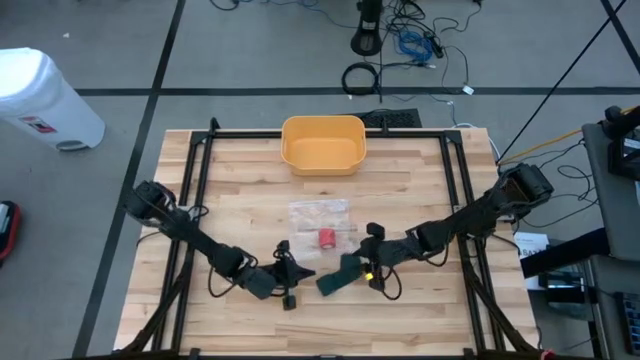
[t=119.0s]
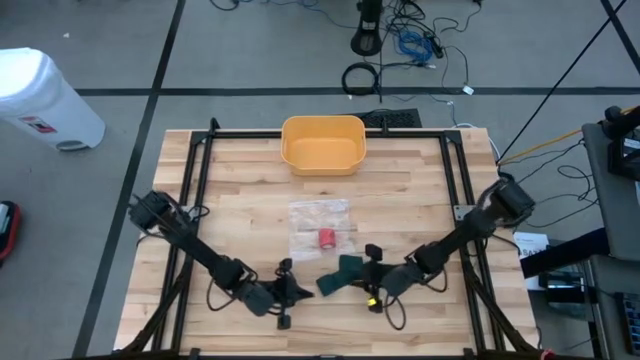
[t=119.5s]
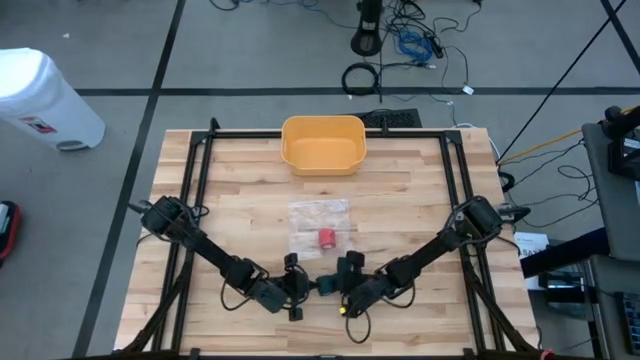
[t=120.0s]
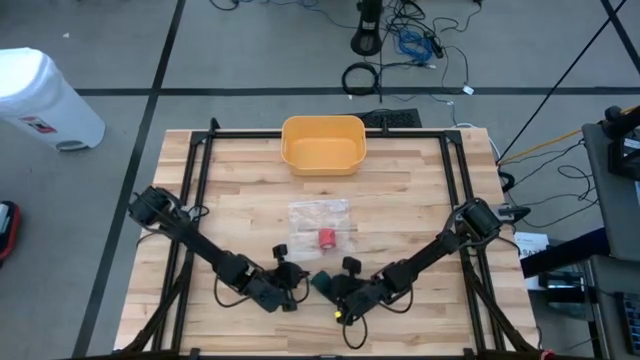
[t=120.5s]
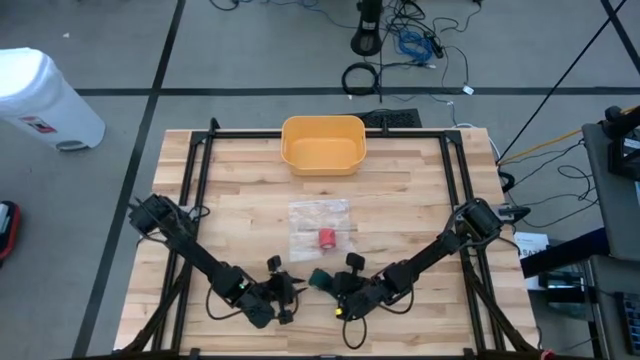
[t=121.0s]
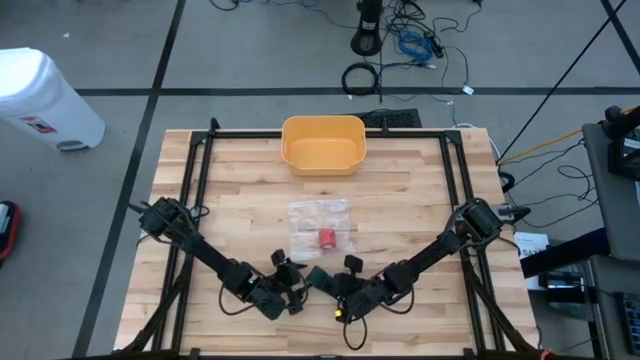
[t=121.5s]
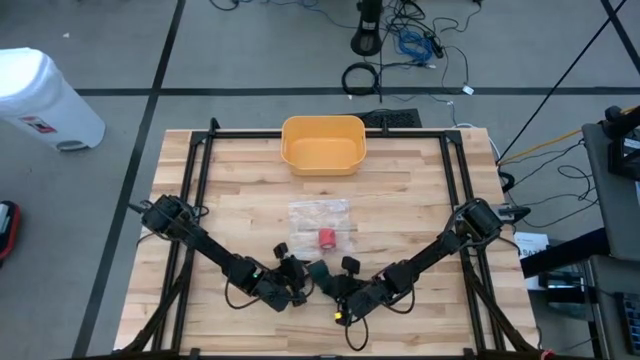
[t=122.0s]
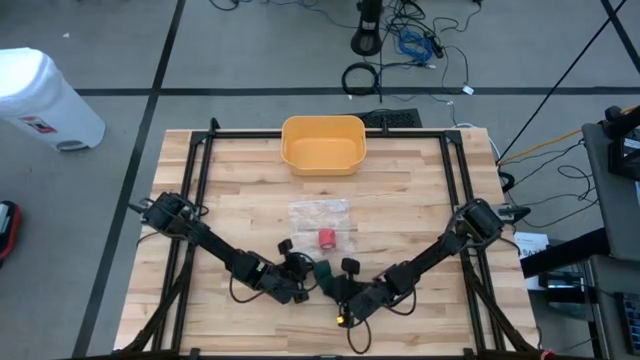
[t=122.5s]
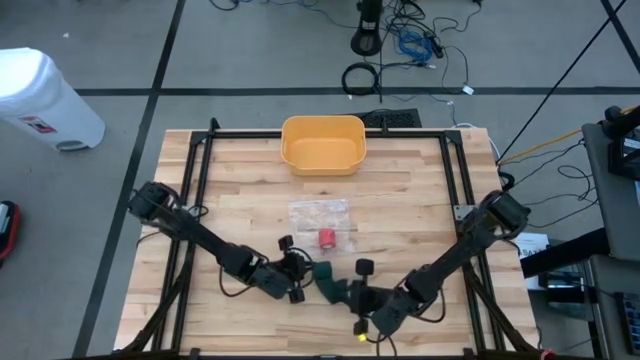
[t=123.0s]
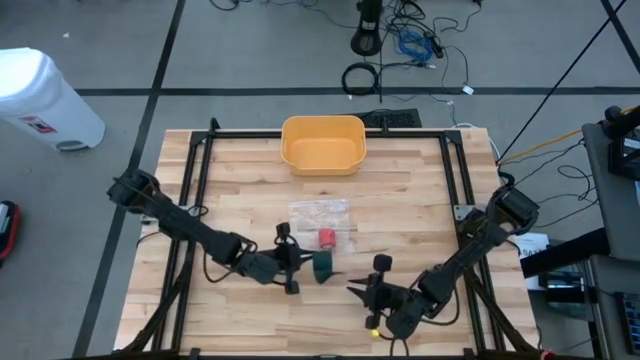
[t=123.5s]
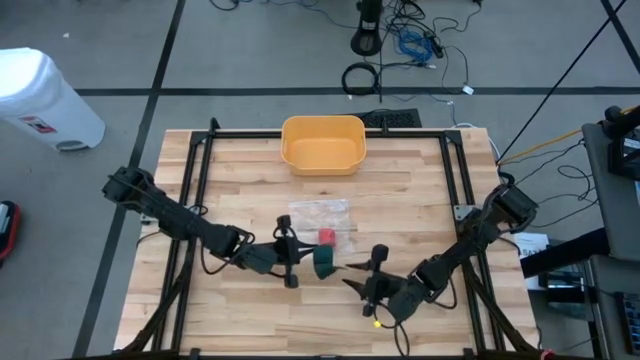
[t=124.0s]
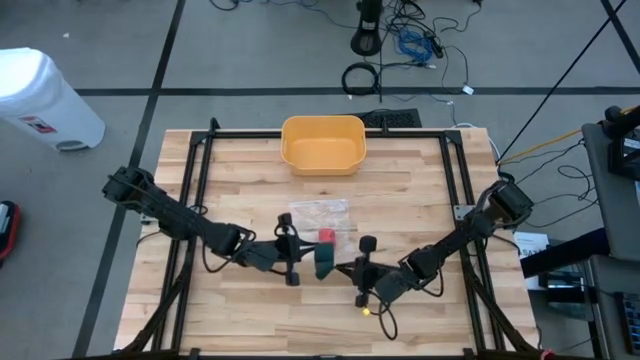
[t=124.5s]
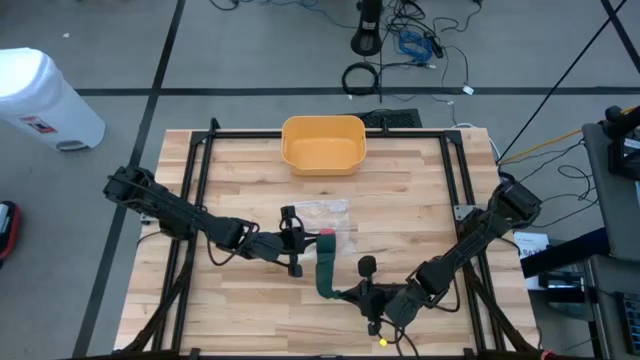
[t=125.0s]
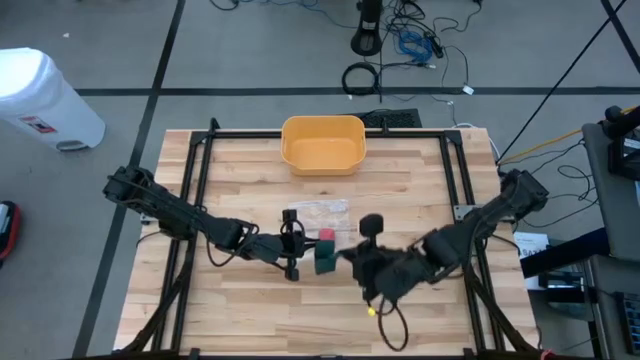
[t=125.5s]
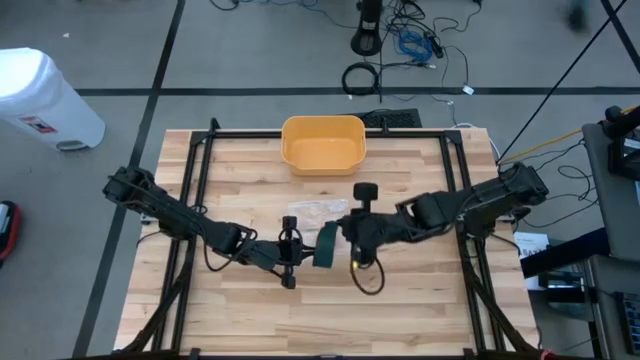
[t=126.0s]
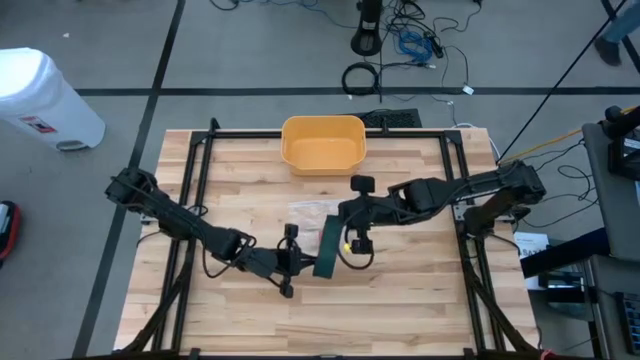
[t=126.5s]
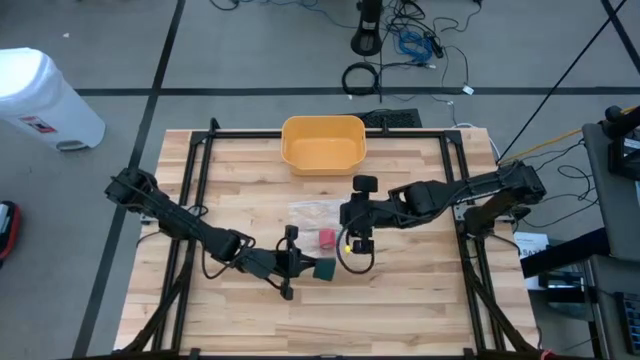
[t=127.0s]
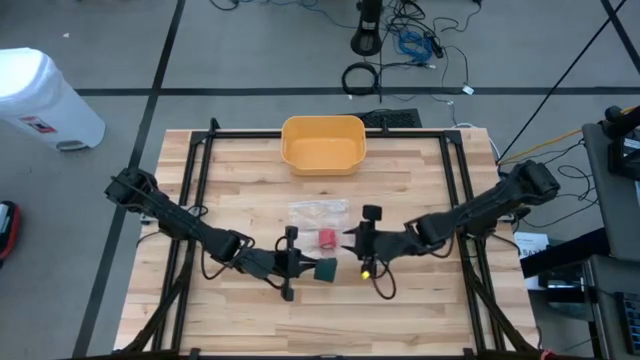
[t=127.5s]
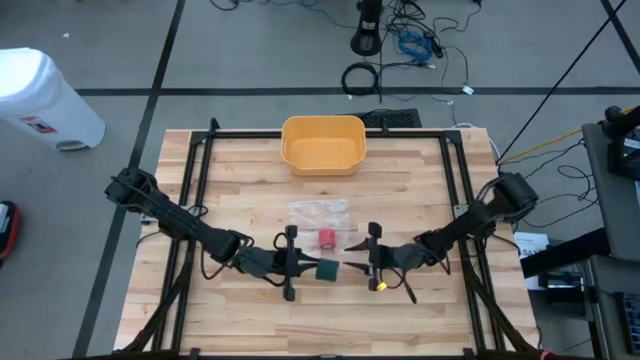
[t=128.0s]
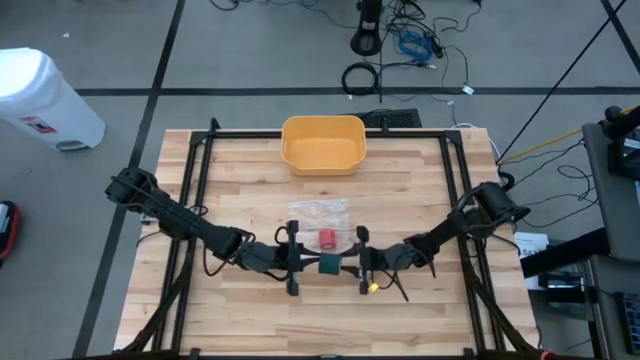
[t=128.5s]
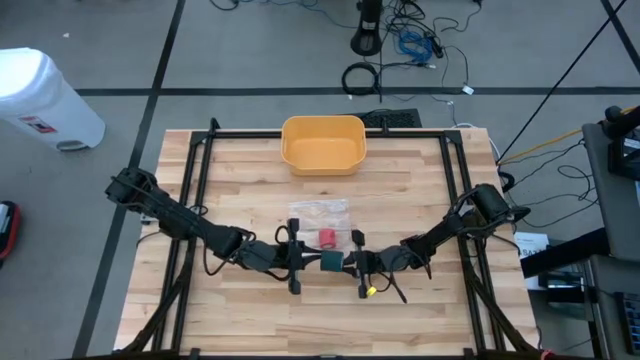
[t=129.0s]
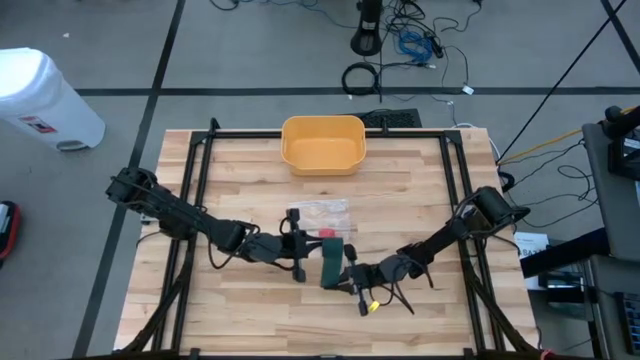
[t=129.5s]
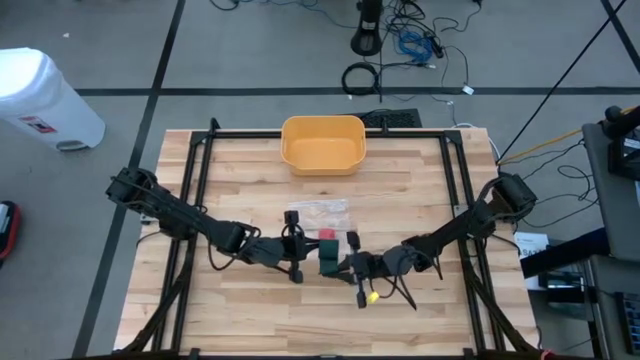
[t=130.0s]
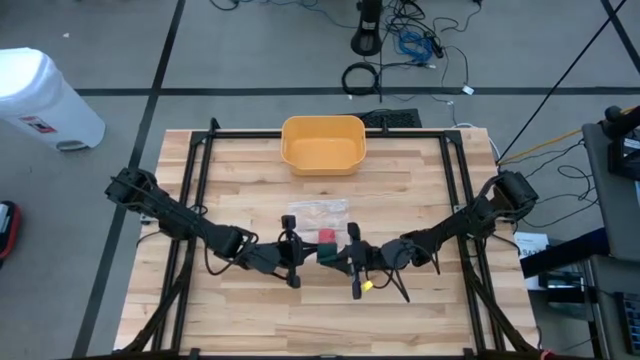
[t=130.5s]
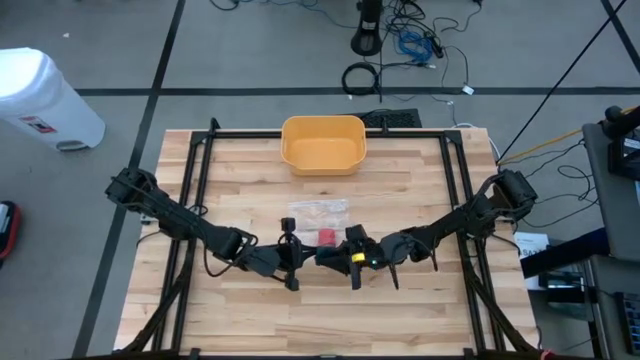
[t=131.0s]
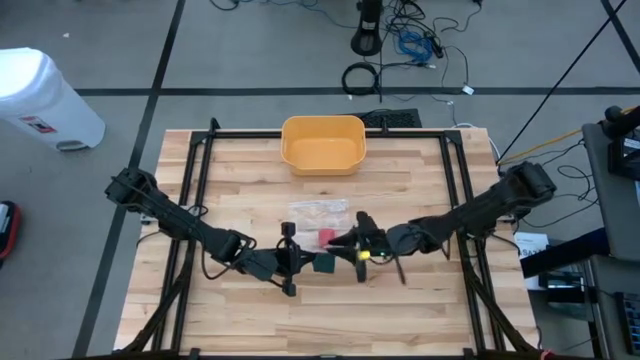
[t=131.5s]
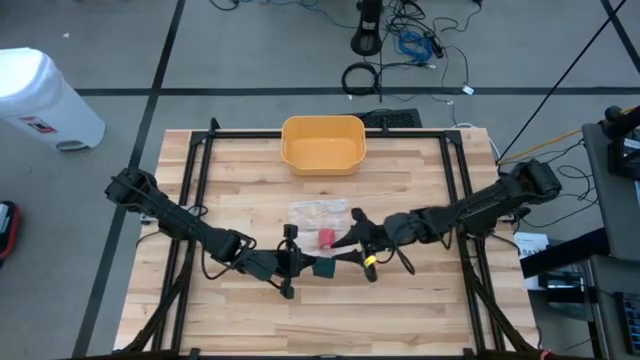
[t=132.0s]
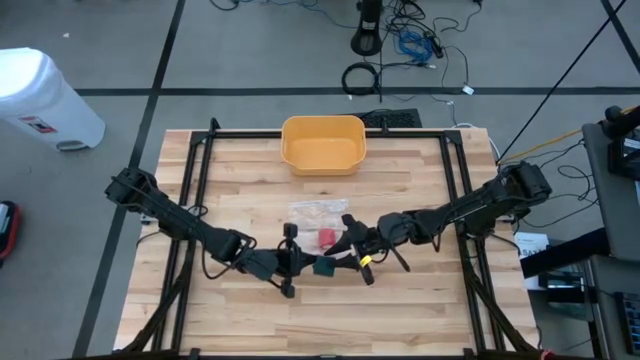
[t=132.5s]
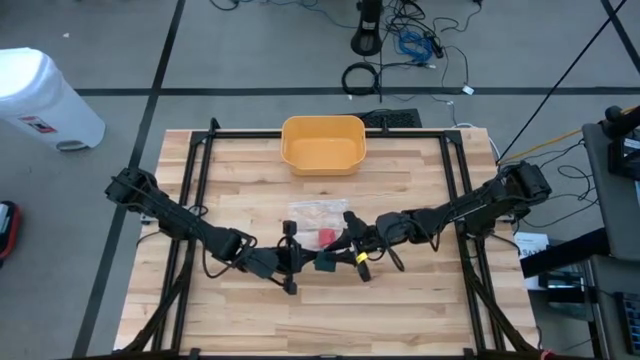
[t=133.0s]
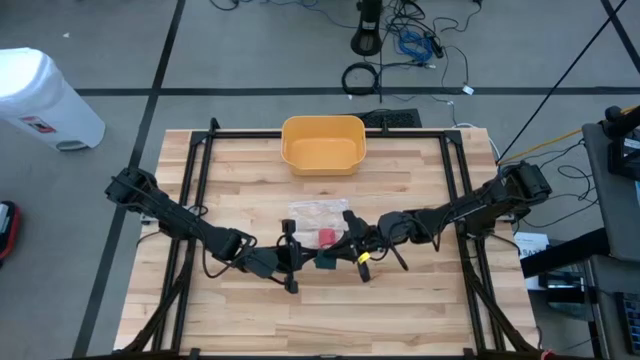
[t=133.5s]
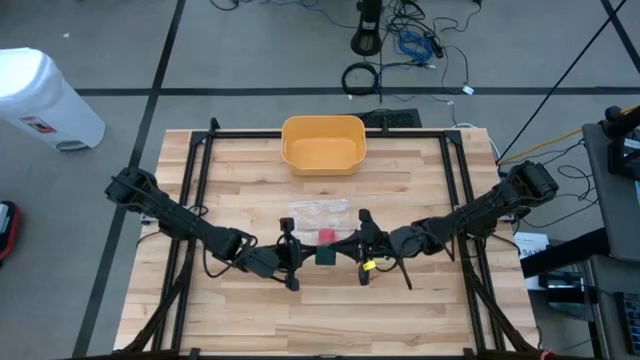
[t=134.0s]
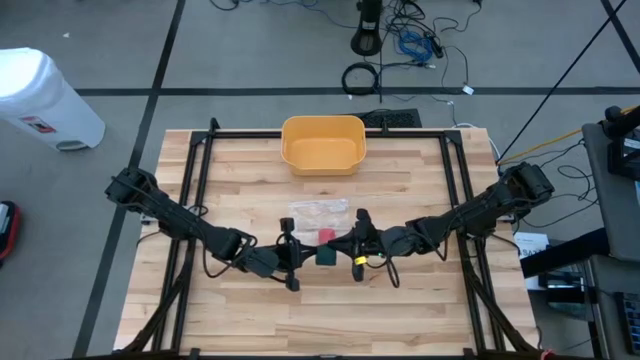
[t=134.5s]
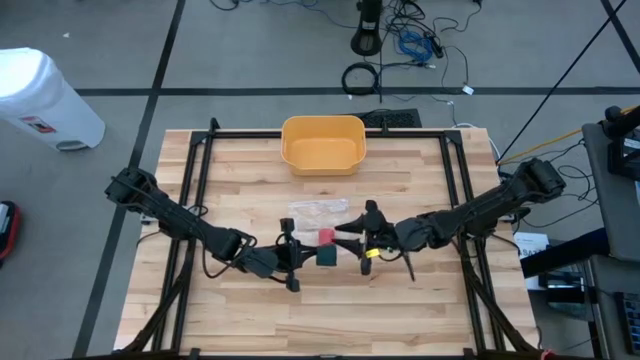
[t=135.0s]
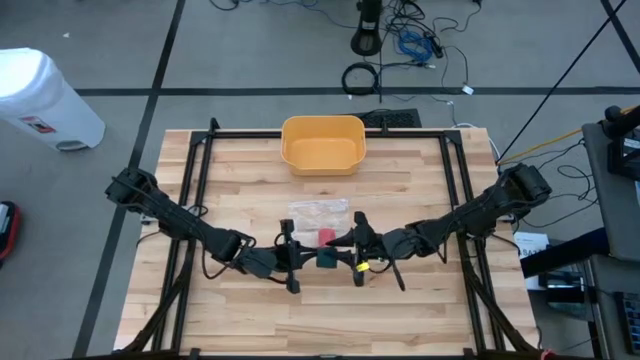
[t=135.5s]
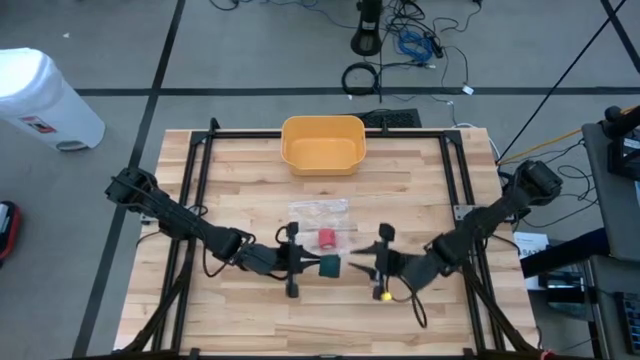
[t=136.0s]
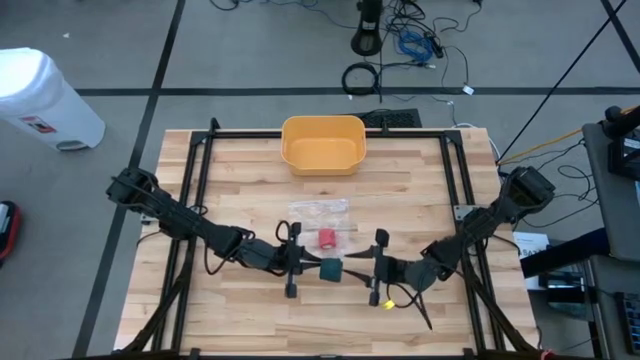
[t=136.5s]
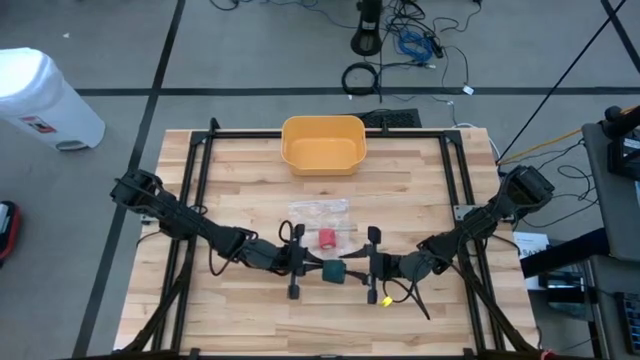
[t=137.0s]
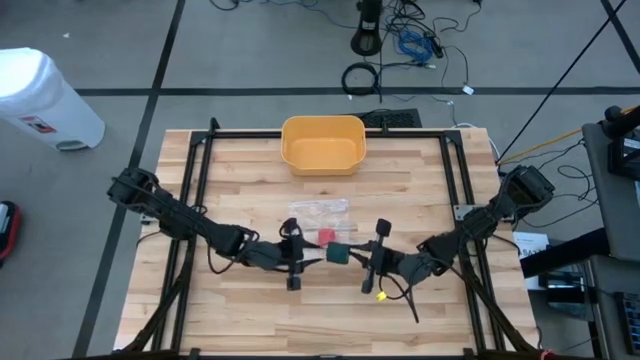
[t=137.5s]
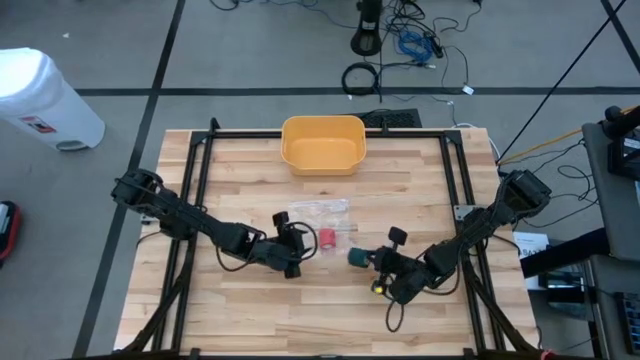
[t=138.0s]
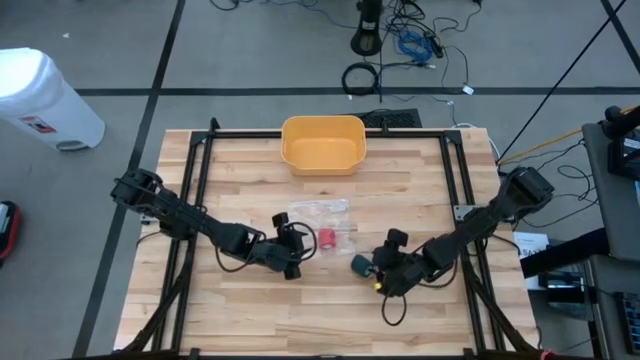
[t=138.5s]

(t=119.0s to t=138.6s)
Task: Roll bandage
Roll the green bandage

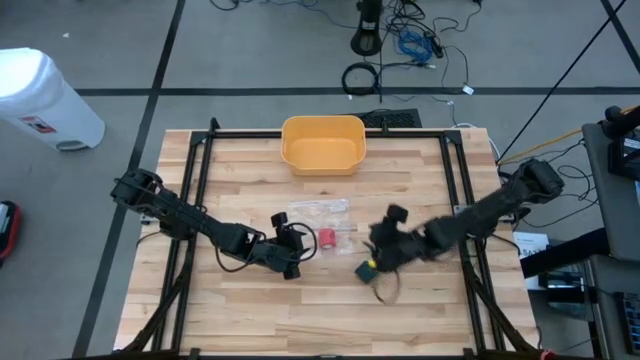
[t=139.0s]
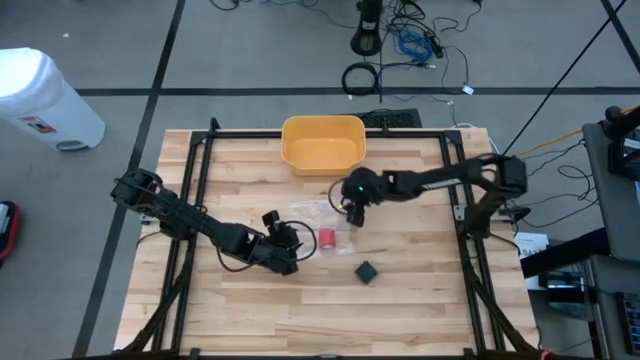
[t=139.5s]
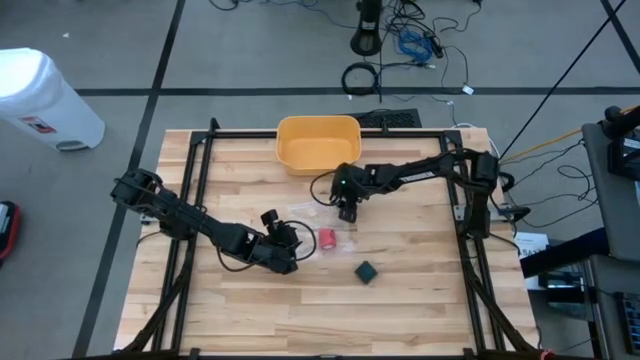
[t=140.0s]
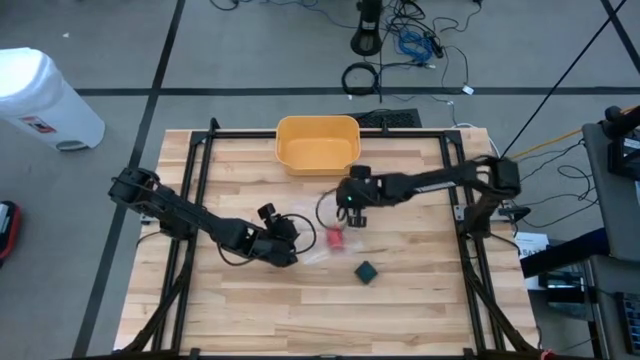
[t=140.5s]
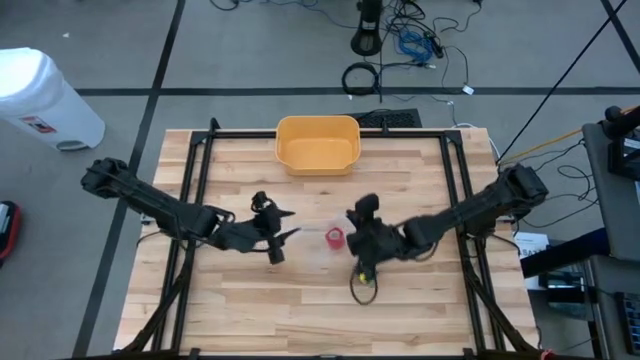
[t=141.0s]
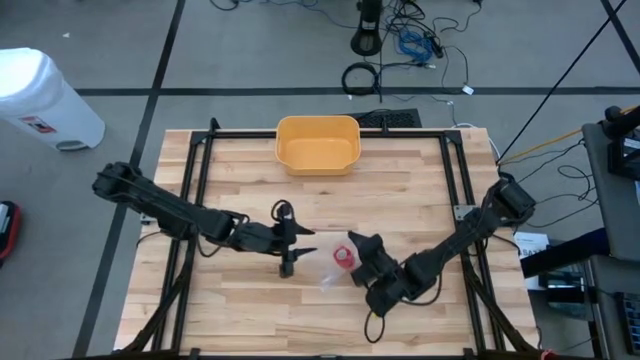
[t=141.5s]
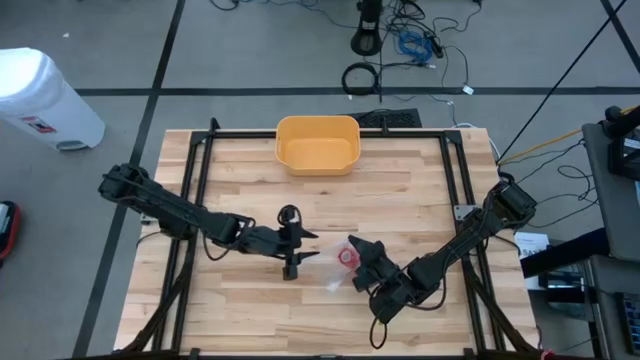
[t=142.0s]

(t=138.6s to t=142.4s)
Open the transparent zip bag containing the rolled red bandage
